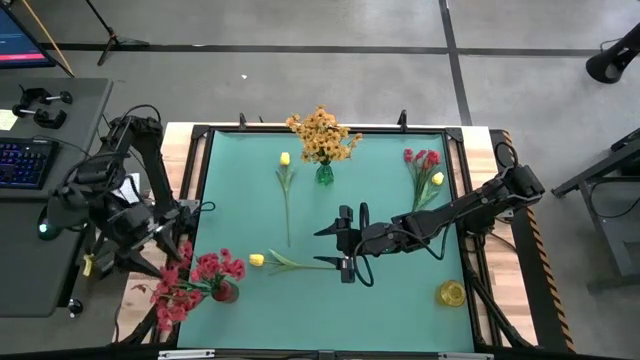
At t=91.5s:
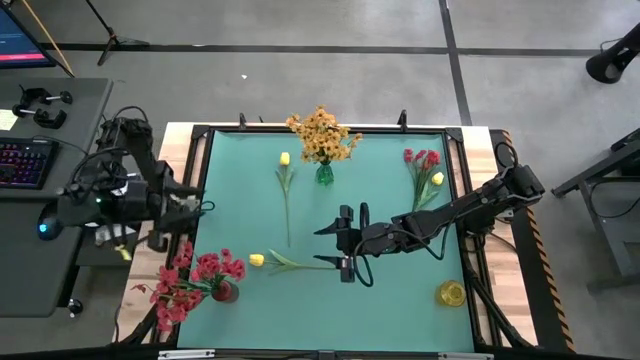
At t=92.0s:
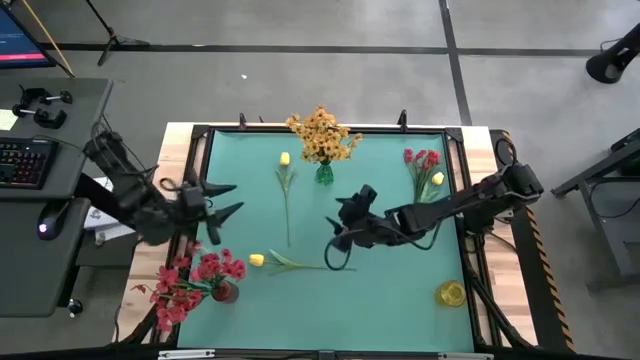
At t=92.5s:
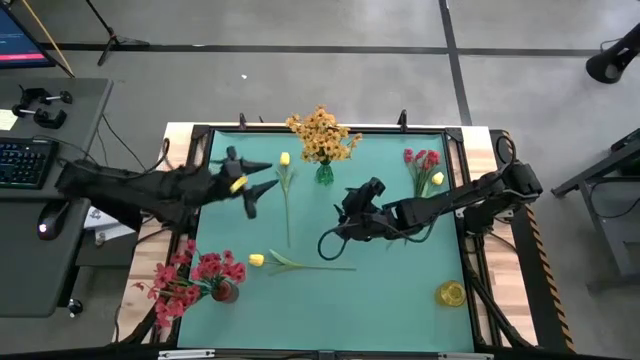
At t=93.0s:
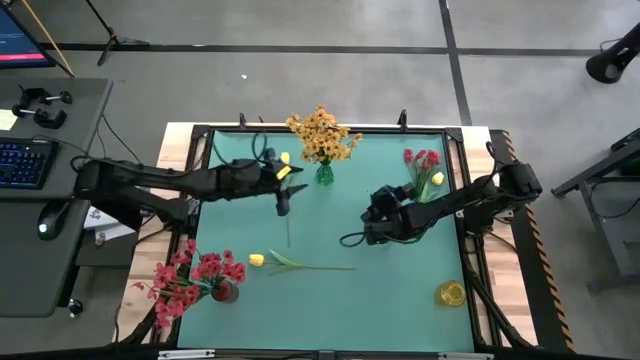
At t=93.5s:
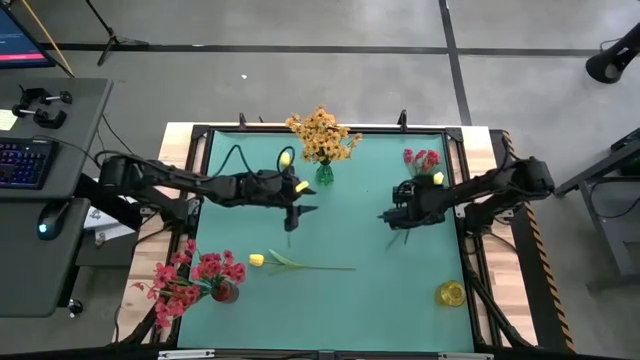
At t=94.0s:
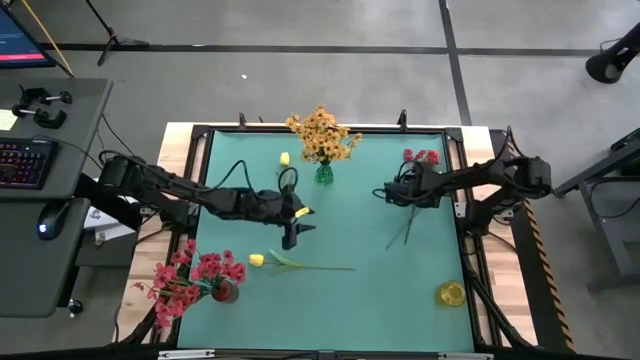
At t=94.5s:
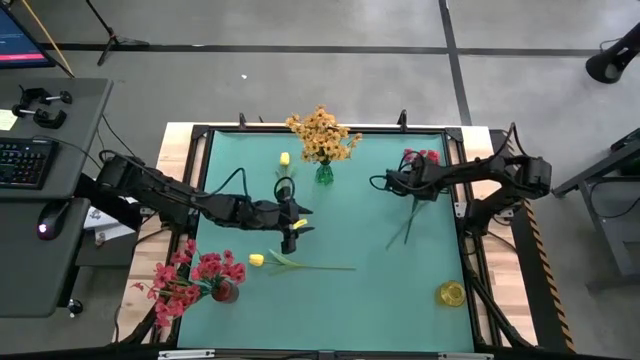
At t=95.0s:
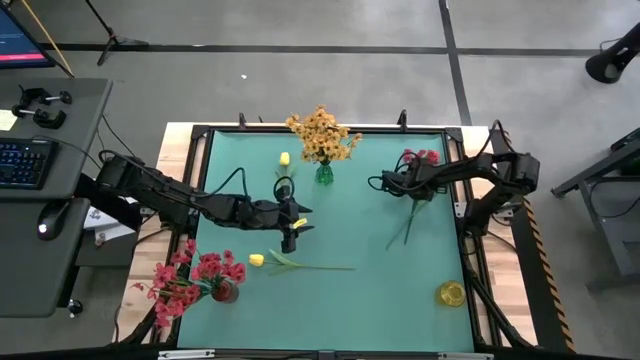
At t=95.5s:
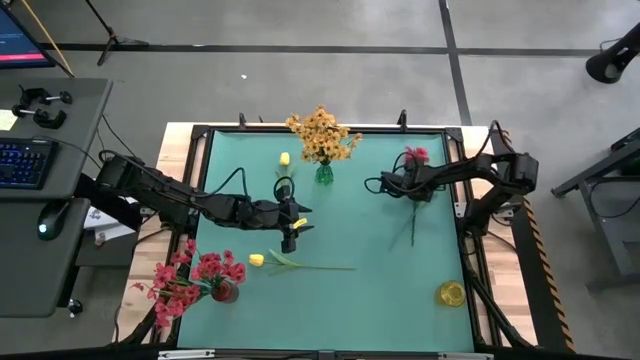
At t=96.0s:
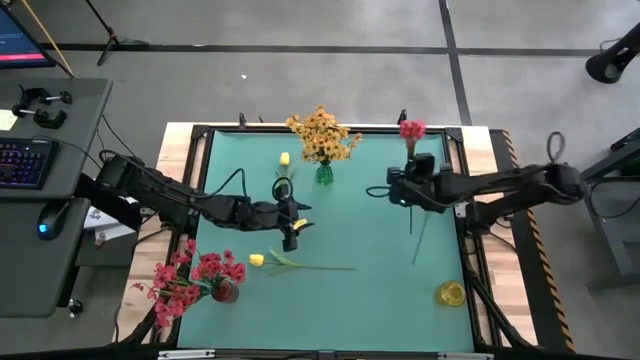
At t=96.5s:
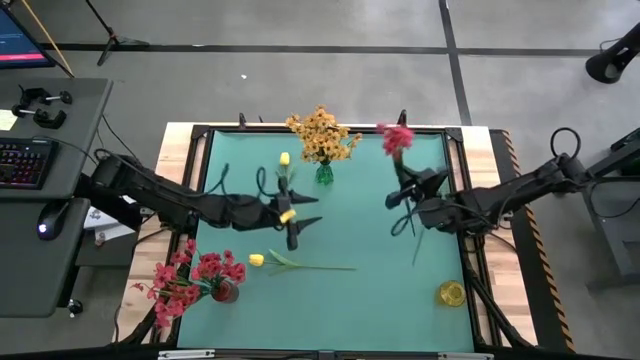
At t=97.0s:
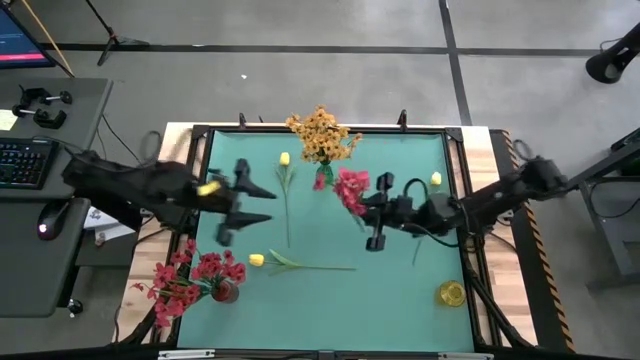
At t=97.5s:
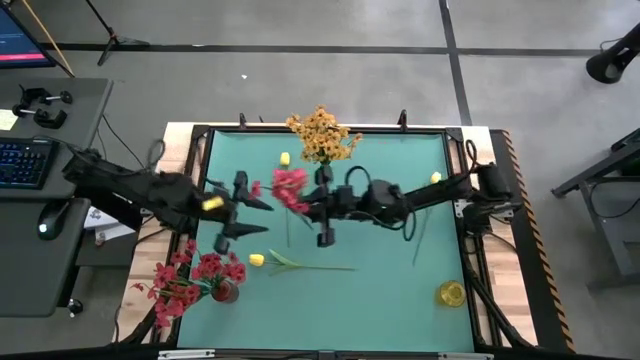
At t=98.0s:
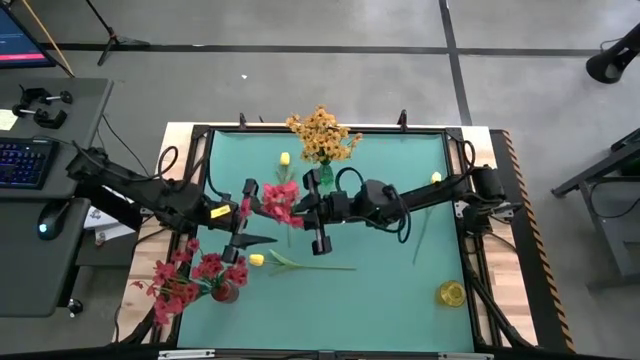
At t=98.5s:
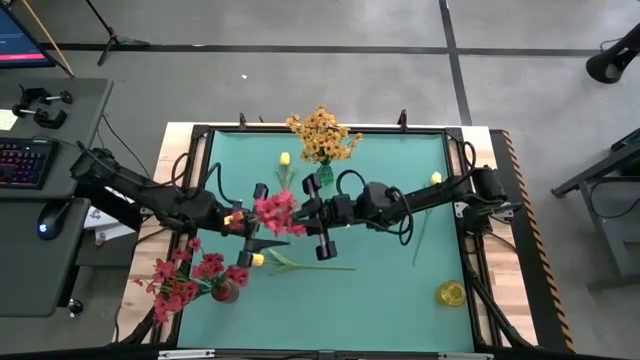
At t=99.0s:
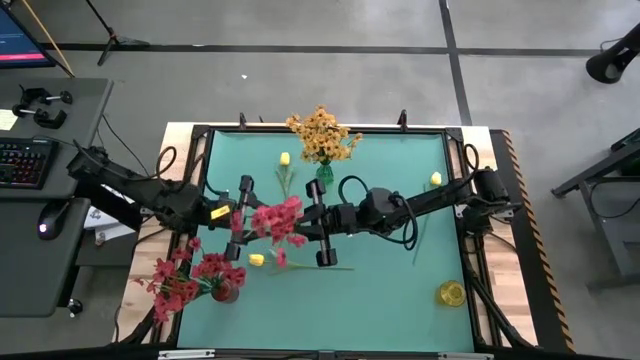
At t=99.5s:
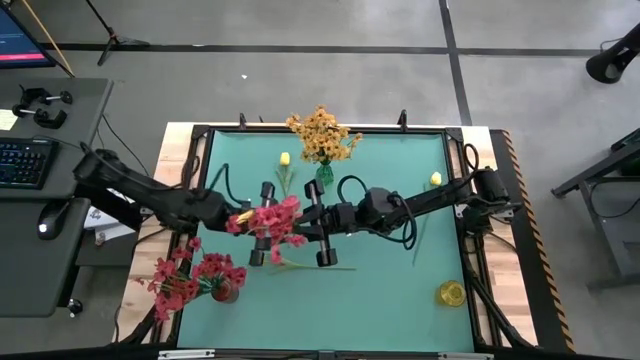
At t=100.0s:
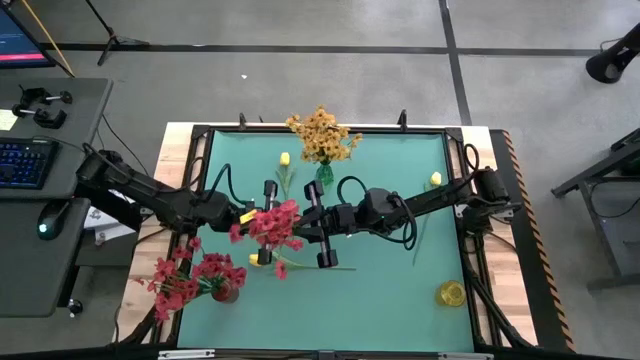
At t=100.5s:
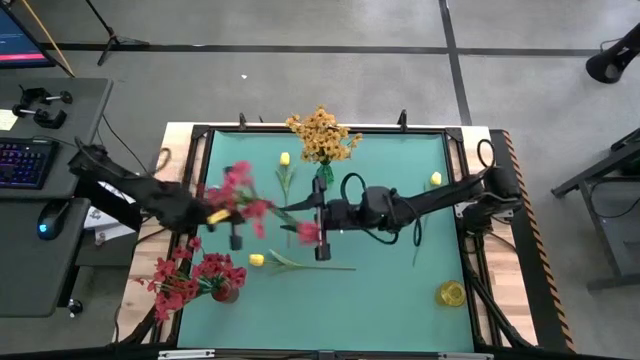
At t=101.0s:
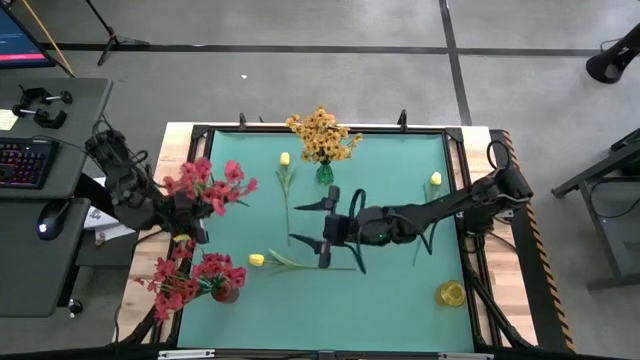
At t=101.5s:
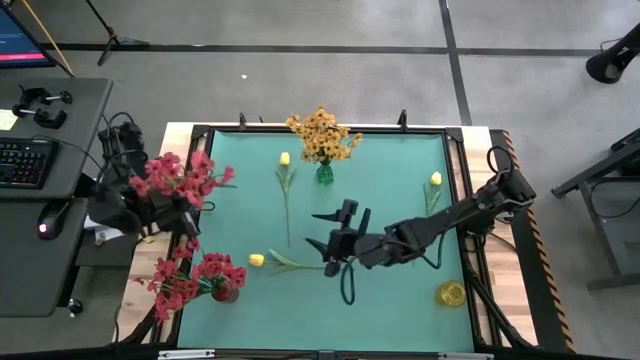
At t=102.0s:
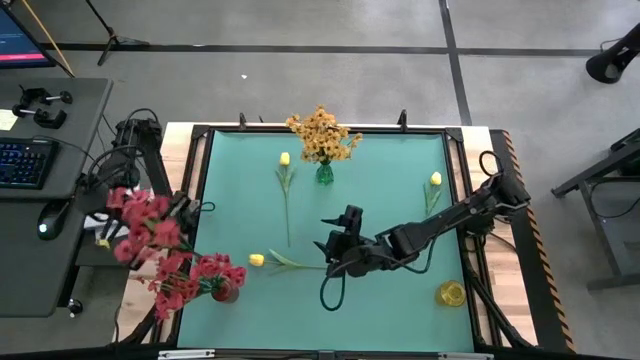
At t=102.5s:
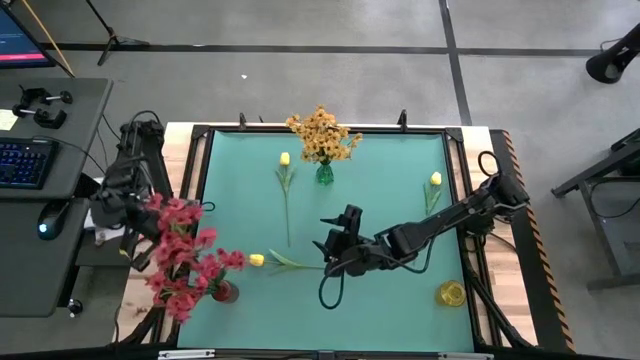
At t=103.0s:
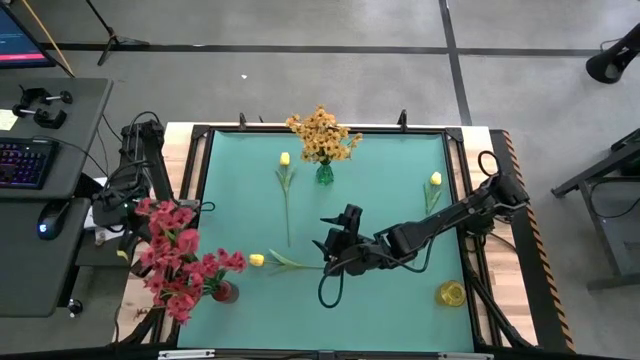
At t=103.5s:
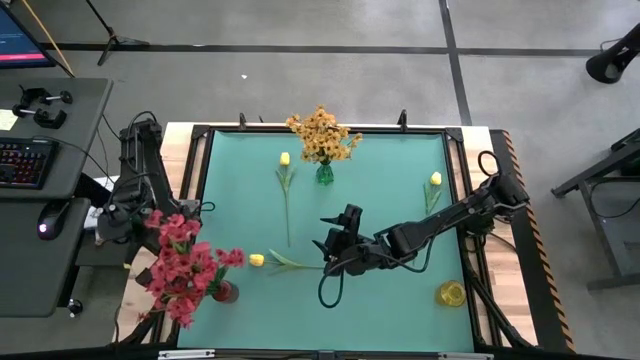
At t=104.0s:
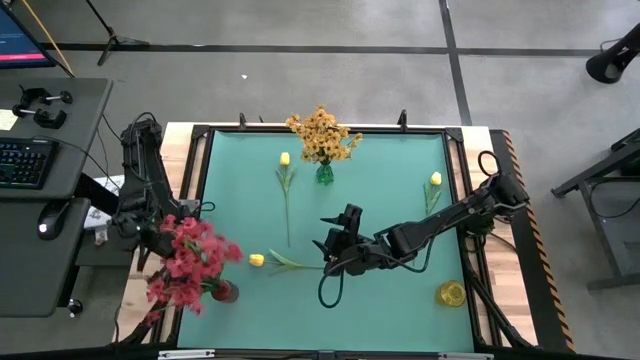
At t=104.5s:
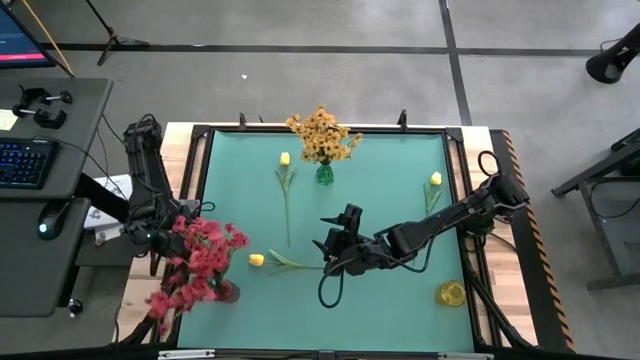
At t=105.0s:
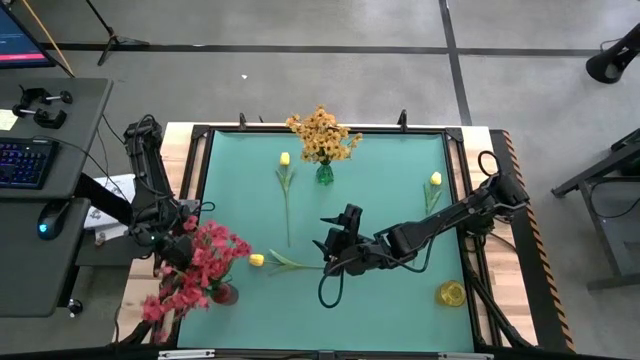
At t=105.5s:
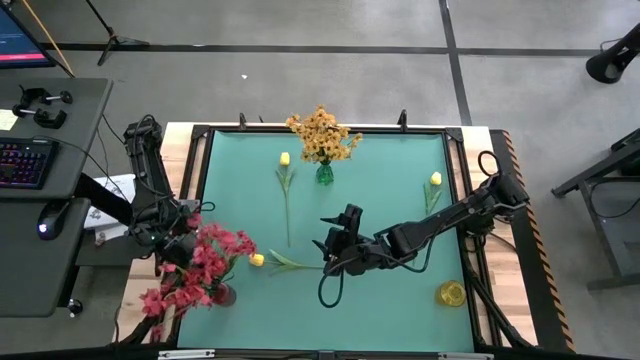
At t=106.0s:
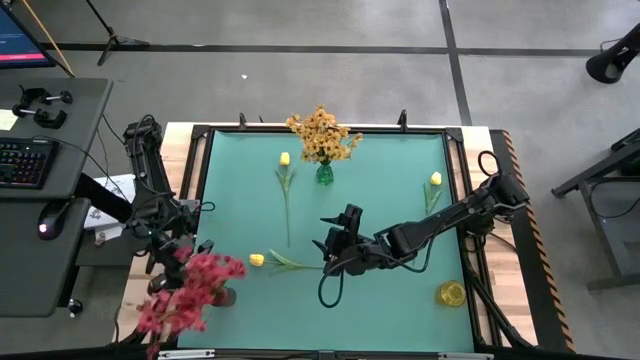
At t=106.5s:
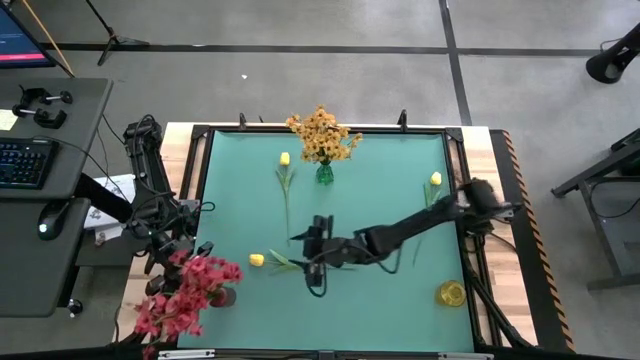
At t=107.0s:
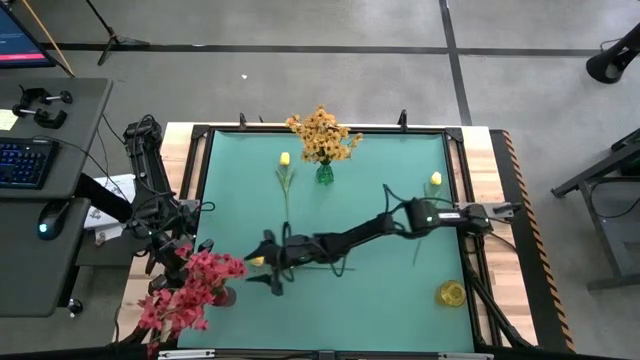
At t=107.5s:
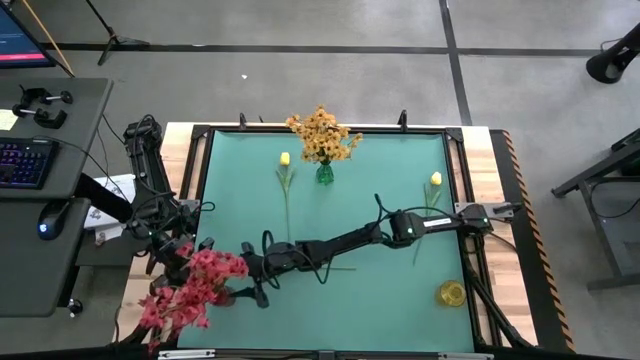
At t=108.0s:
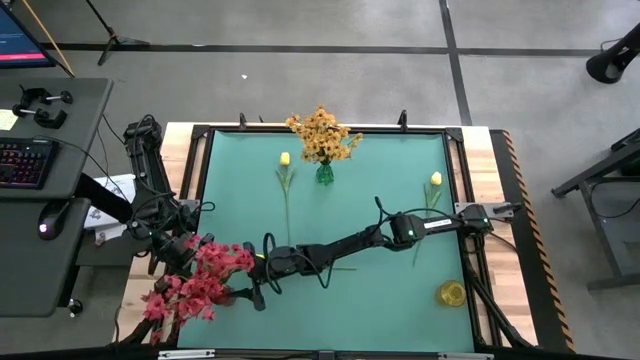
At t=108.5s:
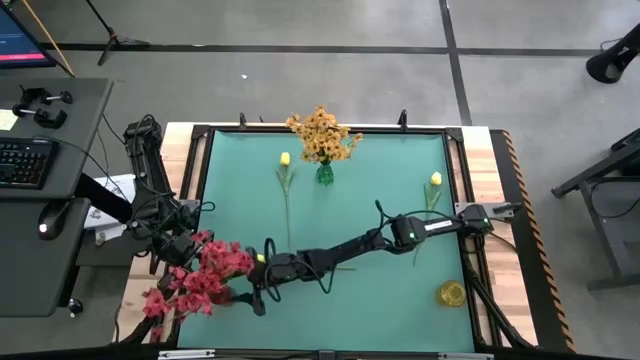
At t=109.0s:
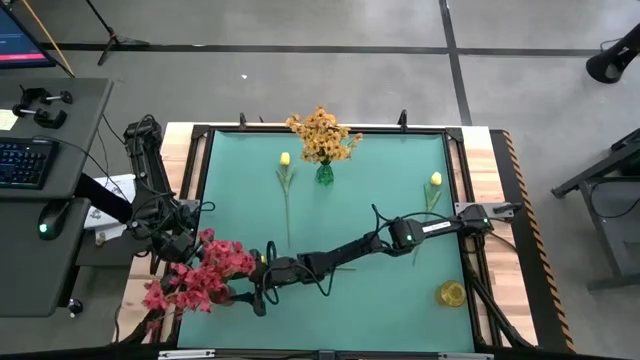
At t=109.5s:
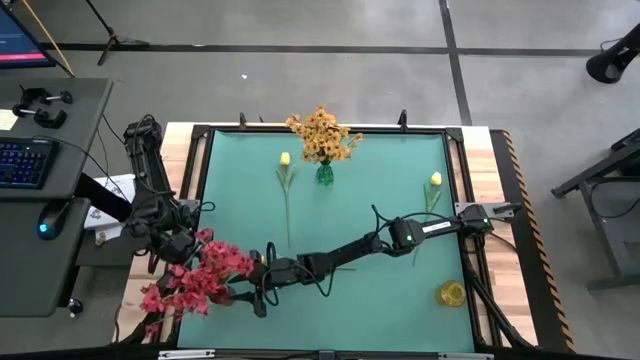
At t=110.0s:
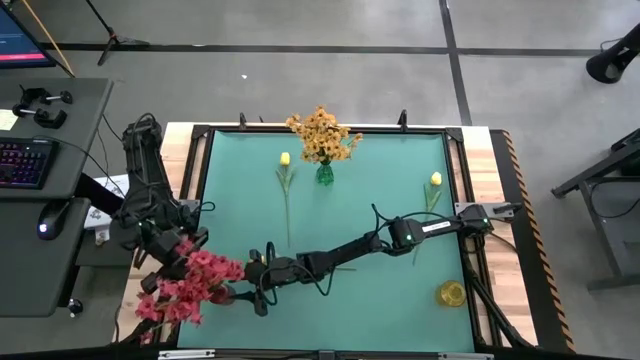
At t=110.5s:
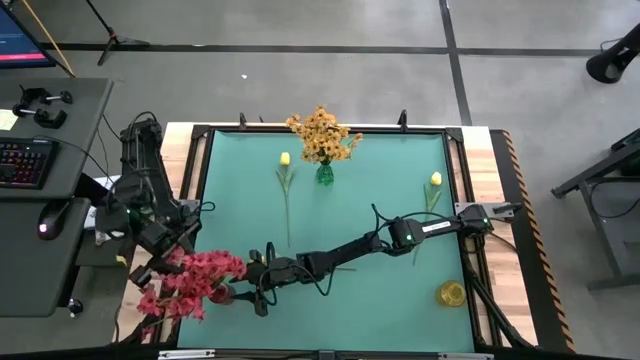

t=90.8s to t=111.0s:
Task: Sort flowers into vase by color
Put the red flower into the red vase

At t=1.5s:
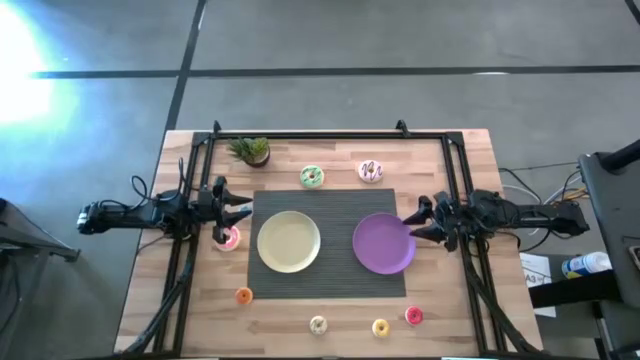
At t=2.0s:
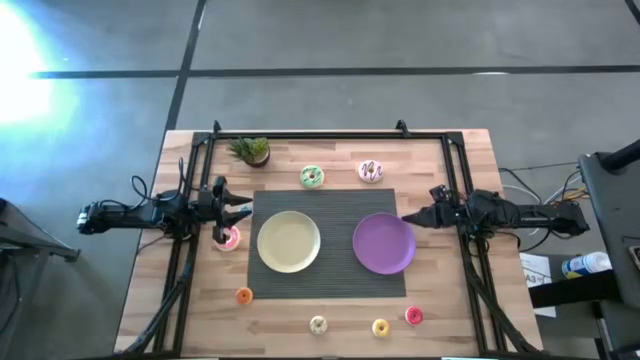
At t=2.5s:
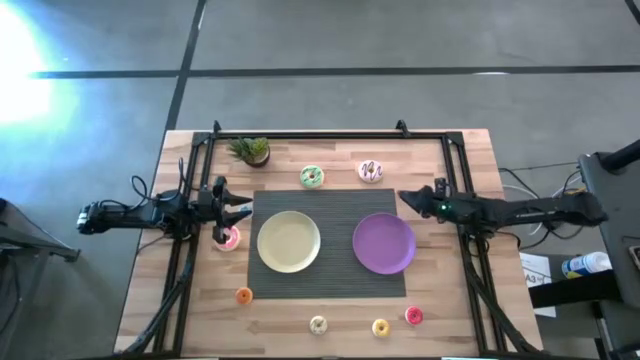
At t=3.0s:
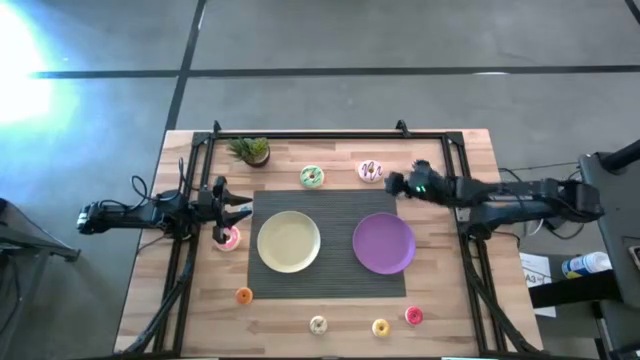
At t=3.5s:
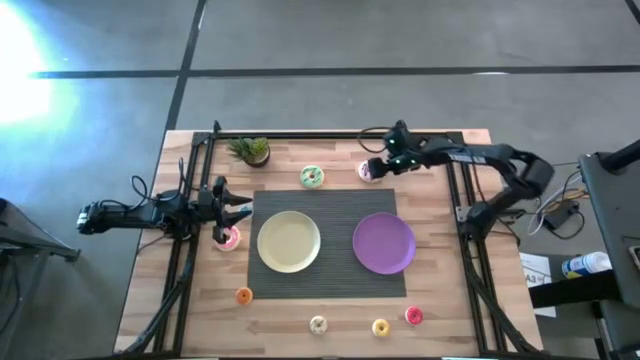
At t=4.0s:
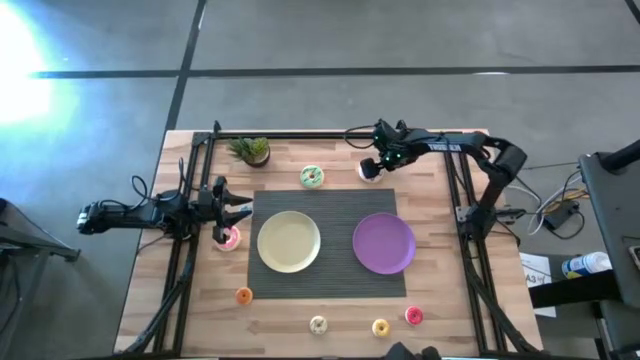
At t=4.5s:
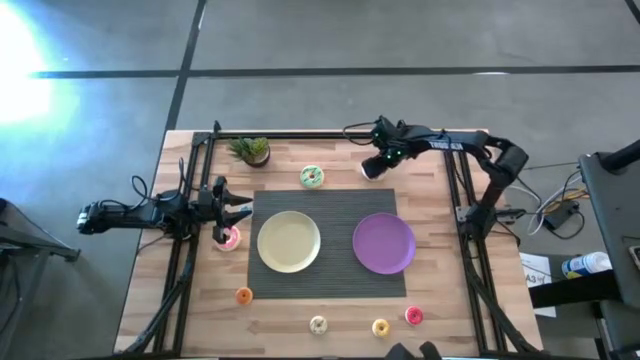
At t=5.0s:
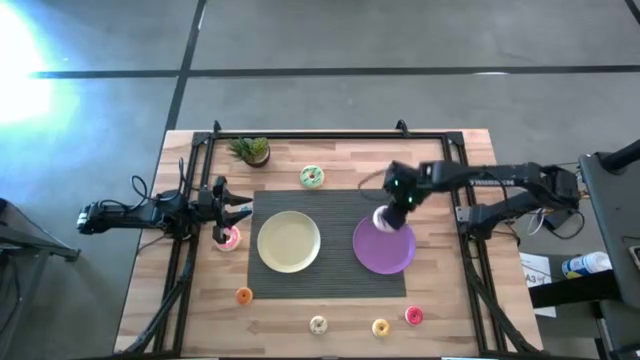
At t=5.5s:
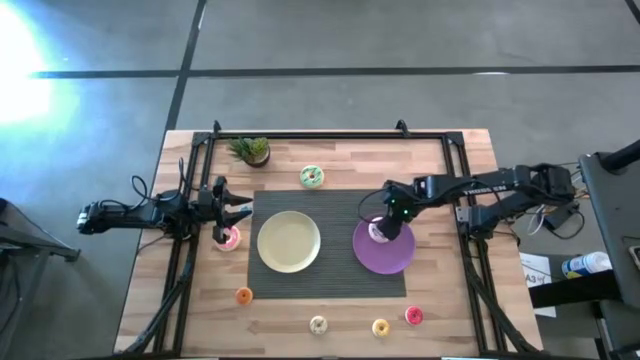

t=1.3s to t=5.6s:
Task: Pick & Place donuts
Put the big white donut on the purple plate
